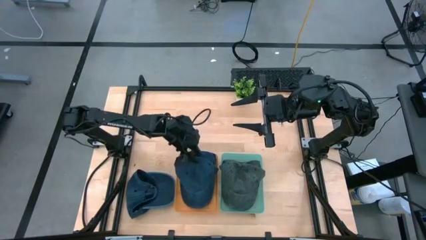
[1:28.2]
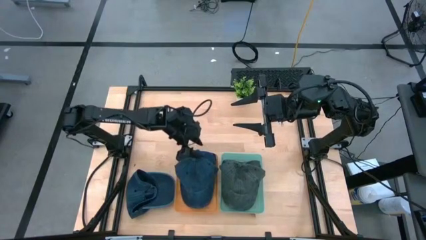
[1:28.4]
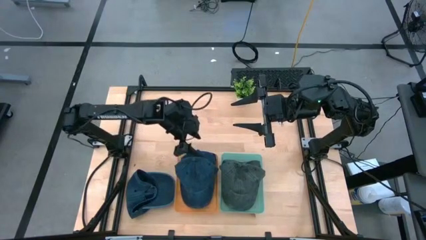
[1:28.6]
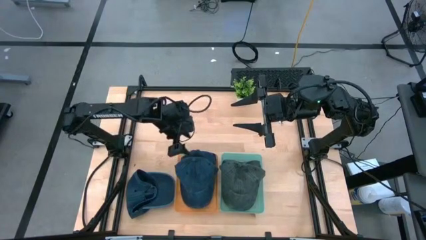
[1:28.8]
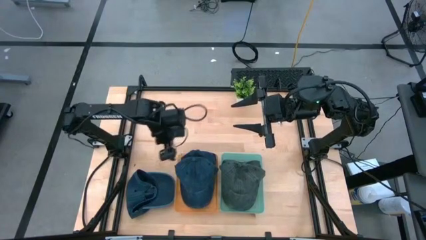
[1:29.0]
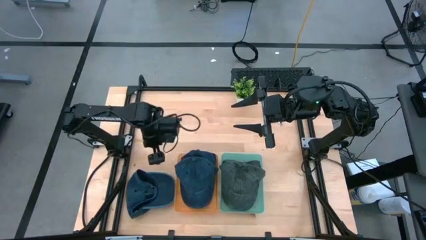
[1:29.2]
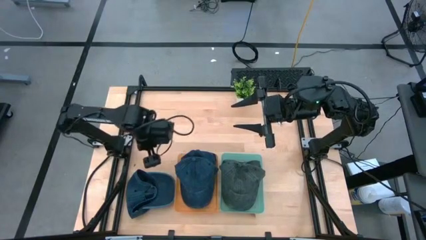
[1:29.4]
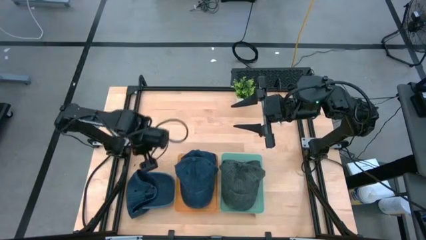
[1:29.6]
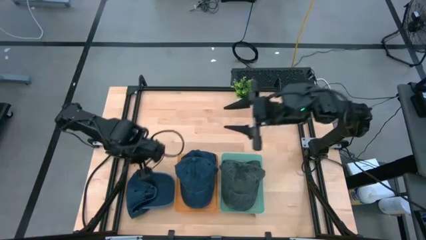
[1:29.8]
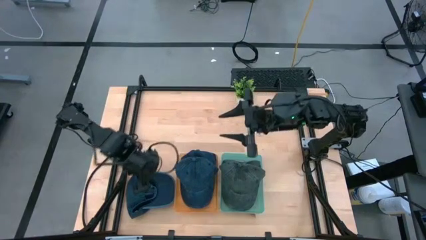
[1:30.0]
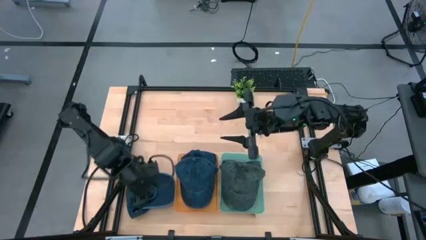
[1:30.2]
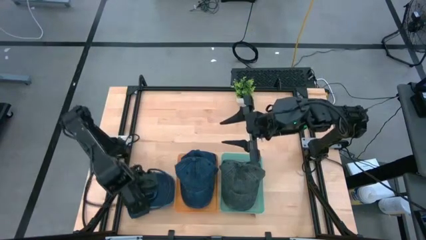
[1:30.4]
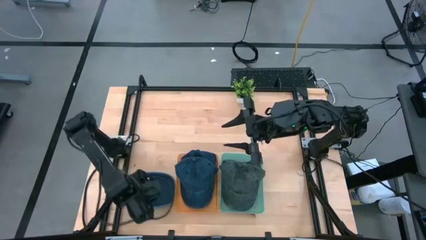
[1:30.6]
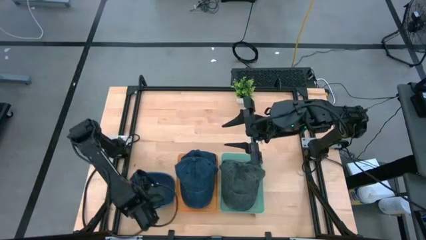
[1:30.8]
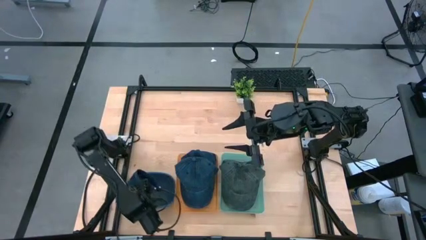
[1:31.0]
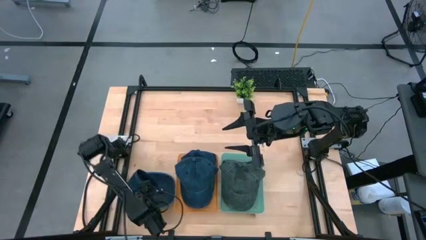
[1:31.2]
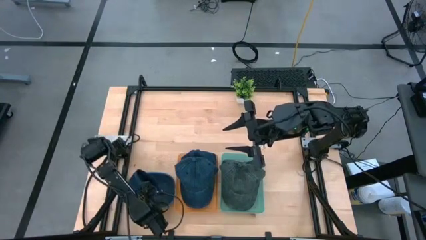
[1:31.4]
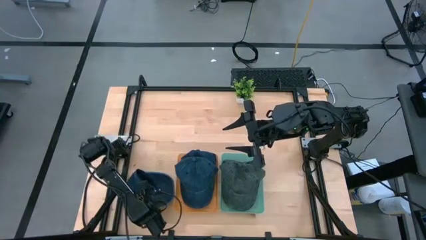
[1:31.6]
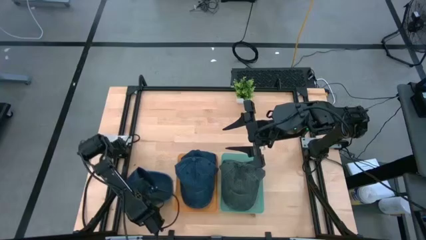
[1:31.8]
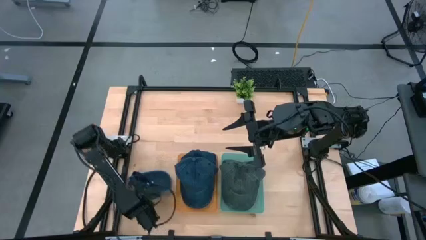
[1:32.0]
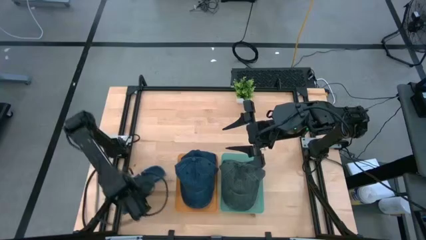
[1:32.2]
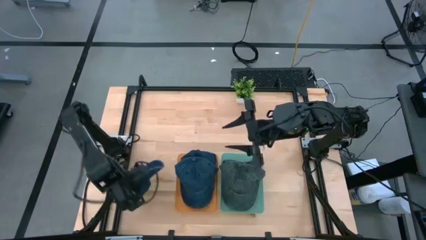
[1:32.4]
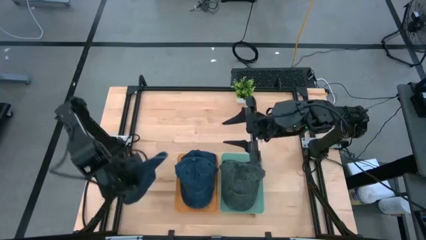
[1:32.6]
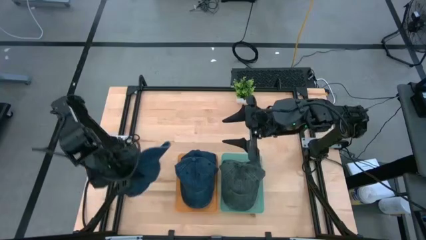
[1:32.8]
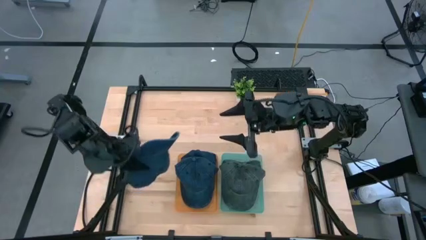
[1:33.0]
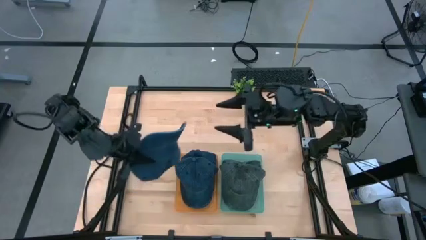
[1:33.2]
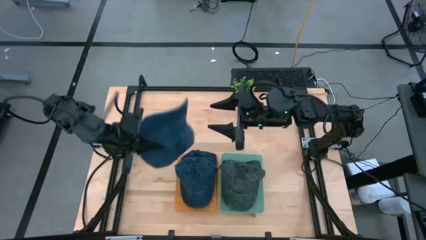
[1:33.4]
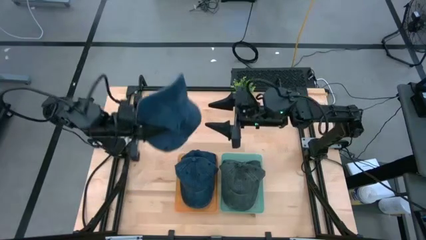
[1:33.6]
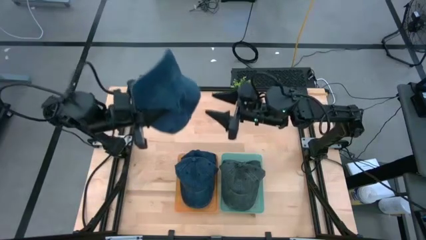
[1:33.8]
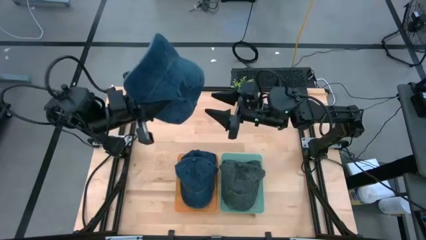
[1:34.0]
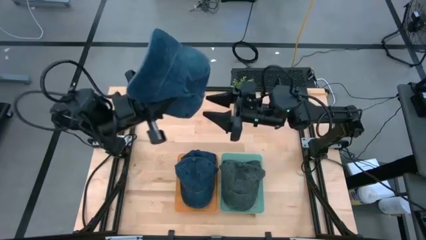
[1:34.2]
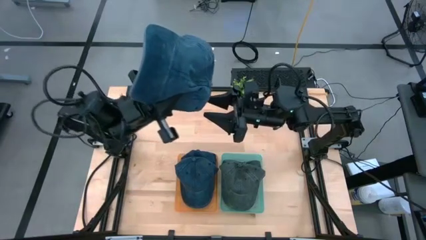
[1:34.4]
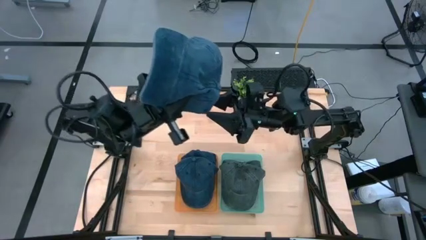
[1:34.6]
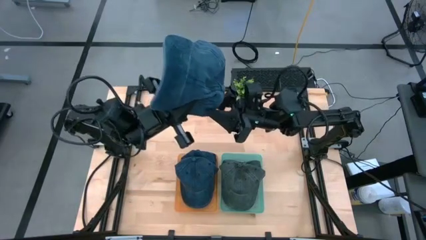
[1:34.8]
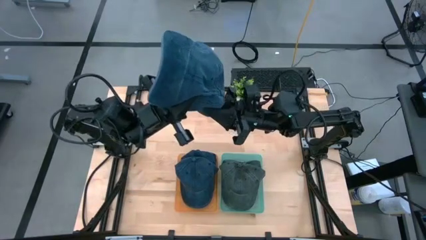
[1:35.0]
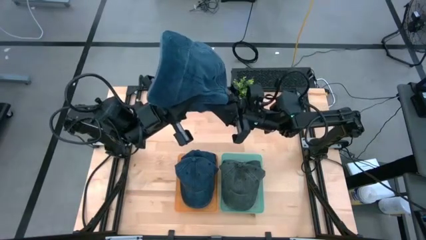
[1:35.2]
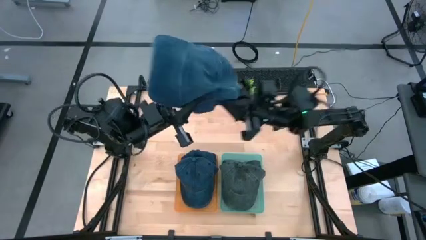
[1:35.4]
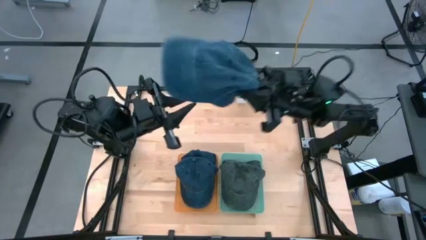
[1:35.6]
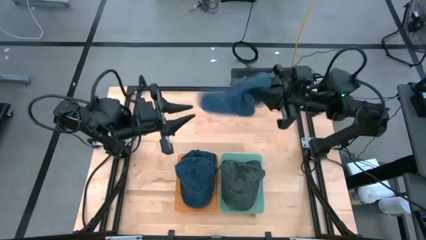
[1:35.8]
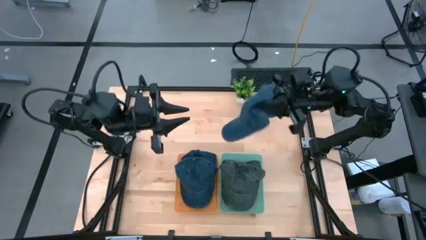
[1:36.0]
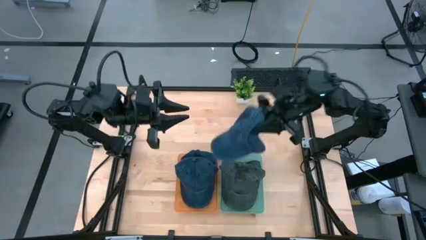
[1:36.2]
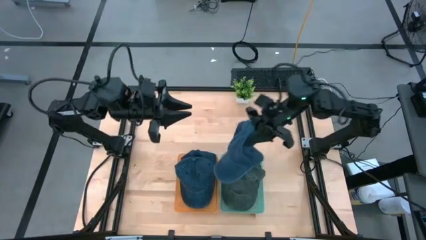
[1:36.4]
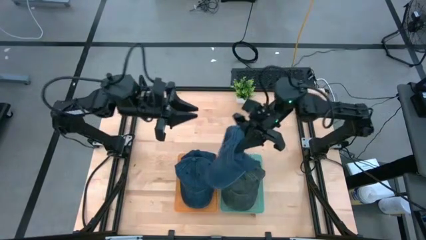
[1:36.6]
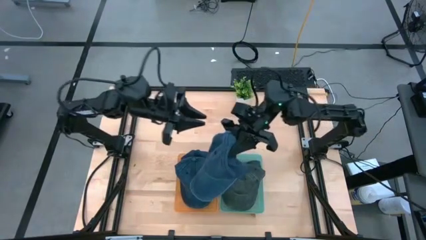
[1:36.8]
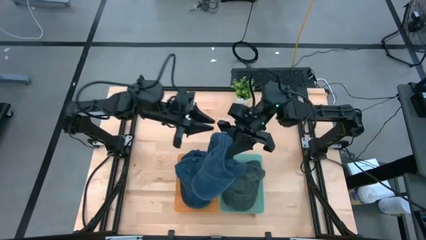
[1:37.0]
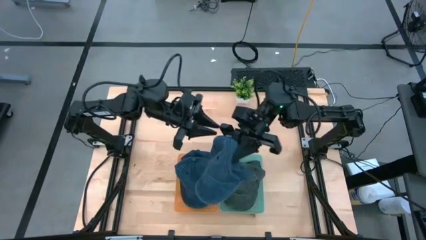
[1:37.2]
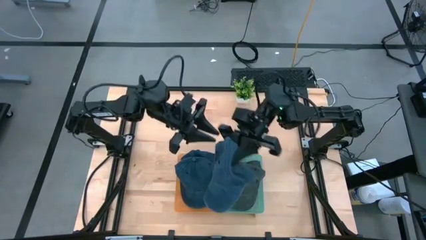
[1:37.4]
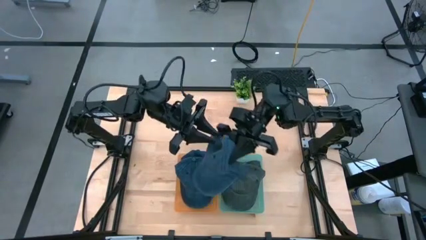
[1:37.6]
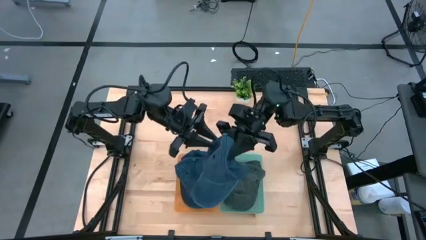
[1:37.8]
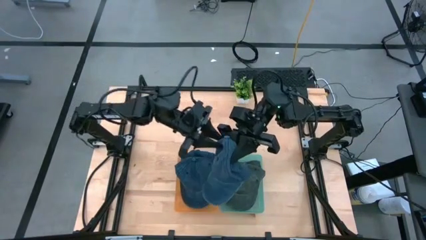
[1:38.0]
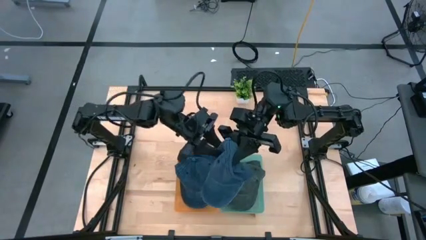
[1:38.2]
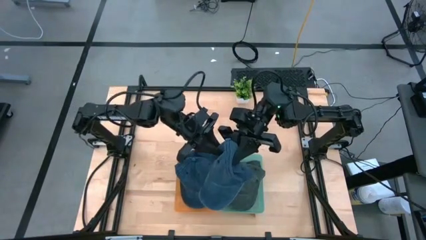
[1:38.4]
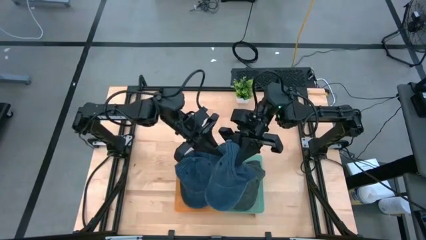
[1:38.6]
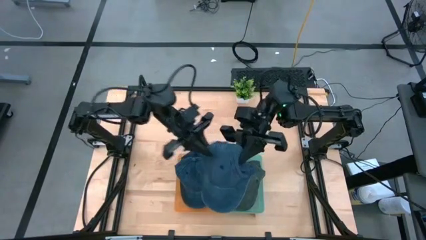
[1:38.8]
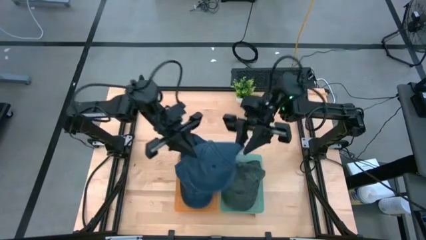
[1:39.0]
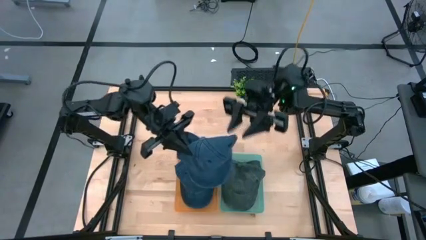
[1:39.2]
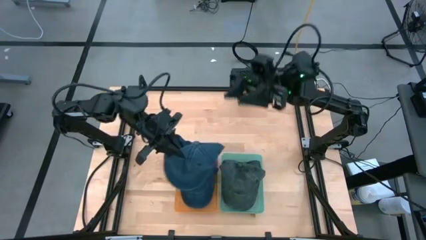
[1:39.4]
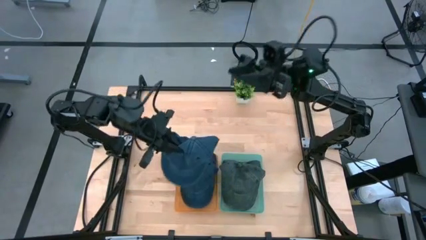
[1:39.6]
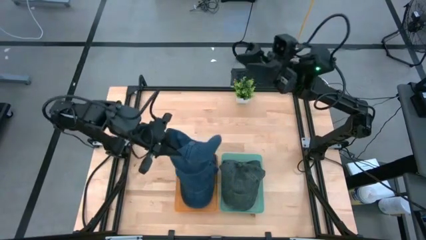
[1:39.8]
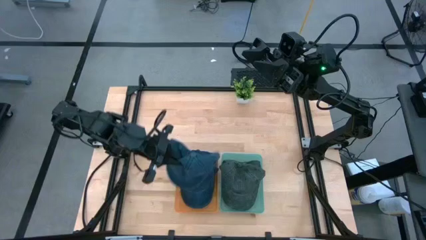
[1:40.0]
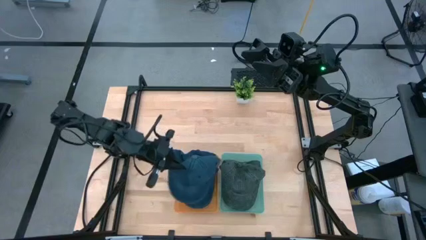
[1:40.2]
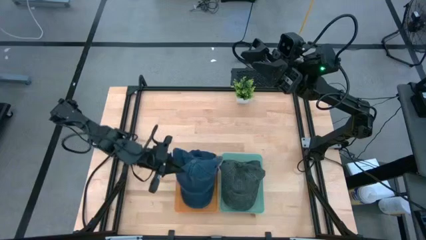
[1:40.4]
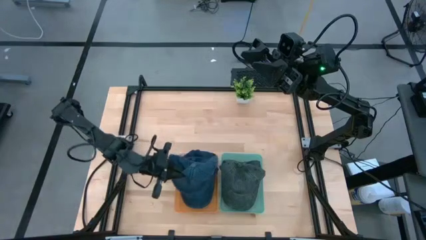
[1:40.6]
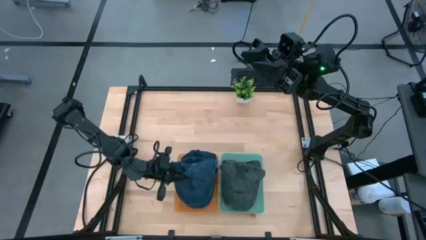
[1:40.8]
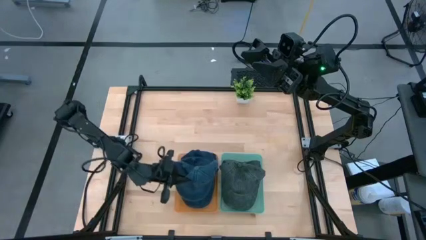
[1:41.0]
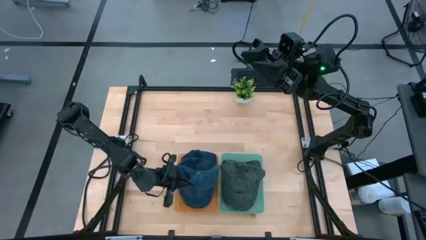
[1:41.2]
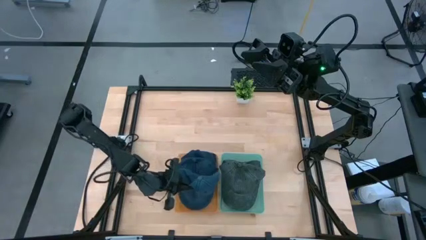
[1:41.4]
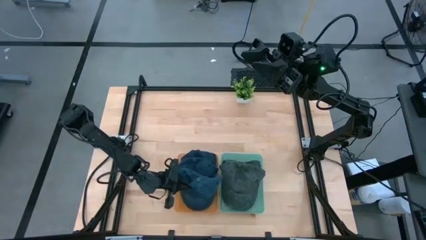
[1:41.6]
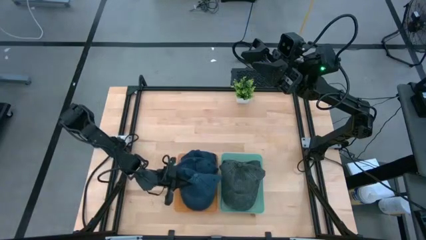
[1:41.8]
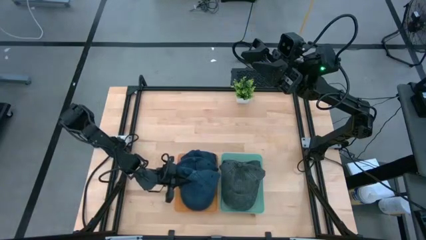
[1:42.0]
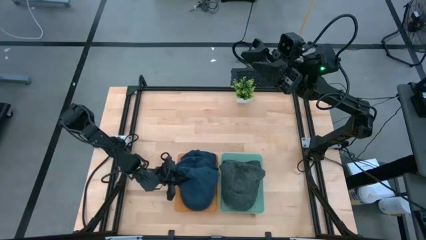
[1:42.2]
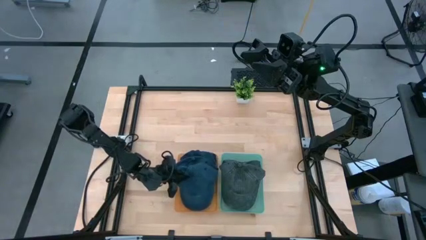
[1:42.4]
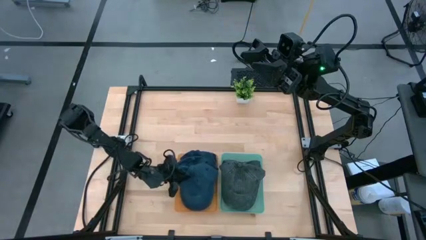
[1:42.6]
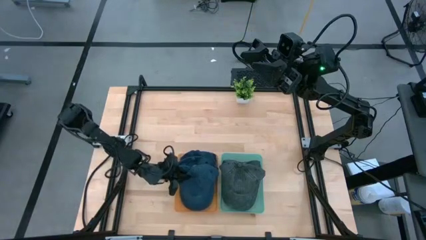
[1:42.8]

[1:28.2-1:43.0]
Task: Pick & Place hat
Put the blue cap into the orange bin

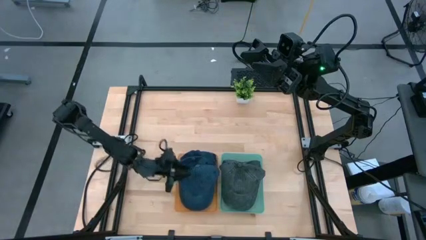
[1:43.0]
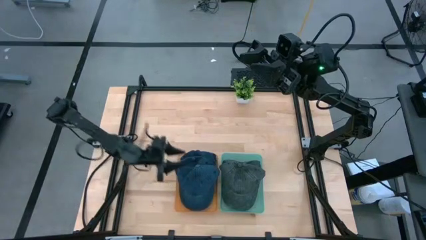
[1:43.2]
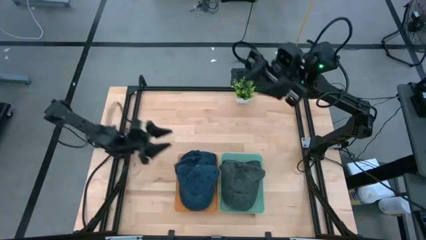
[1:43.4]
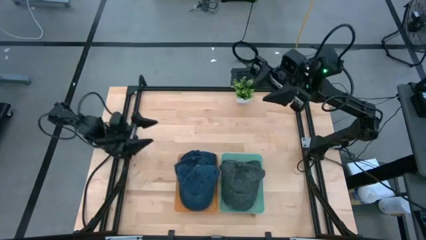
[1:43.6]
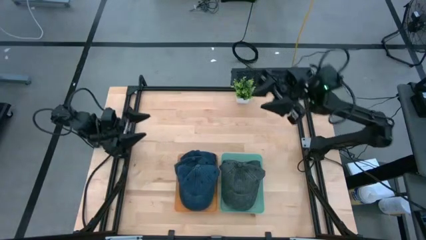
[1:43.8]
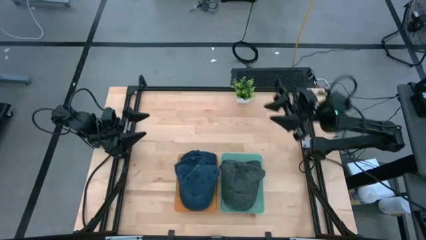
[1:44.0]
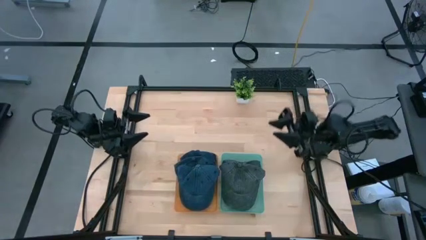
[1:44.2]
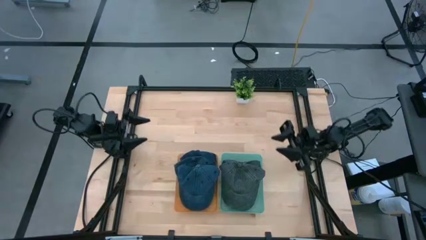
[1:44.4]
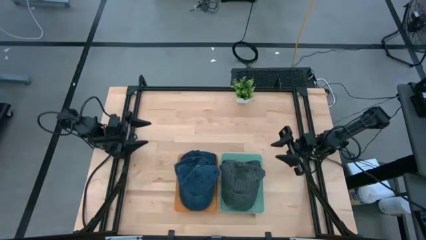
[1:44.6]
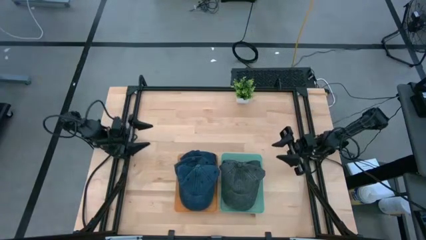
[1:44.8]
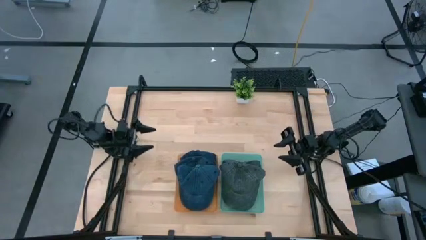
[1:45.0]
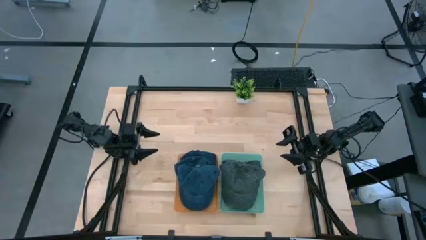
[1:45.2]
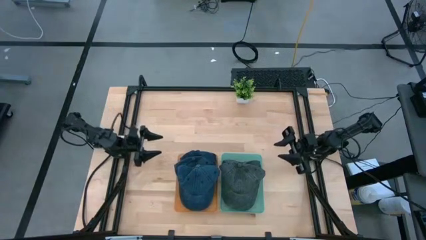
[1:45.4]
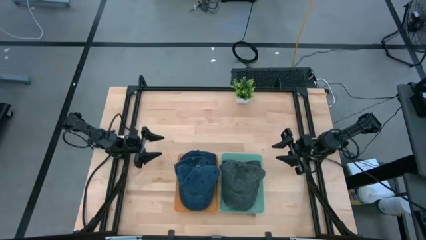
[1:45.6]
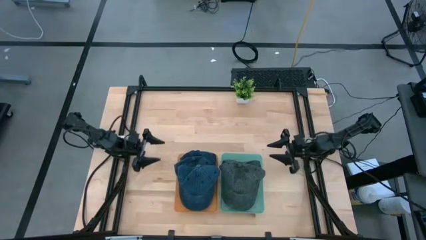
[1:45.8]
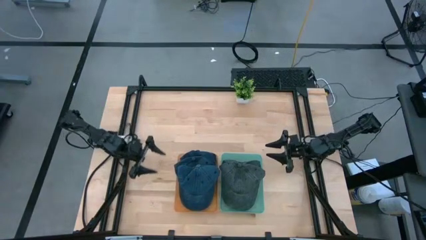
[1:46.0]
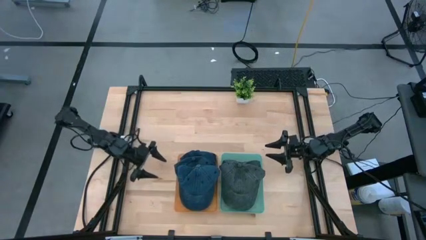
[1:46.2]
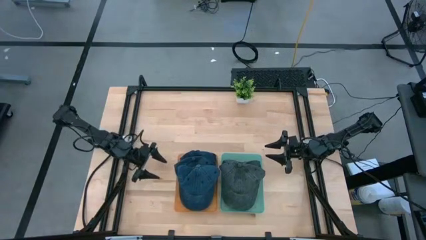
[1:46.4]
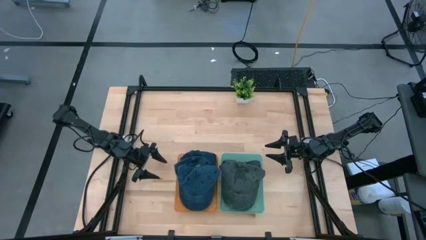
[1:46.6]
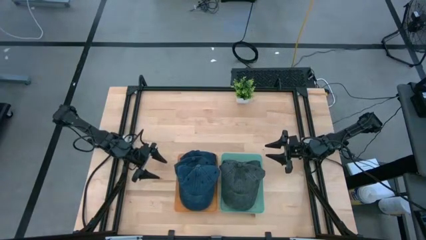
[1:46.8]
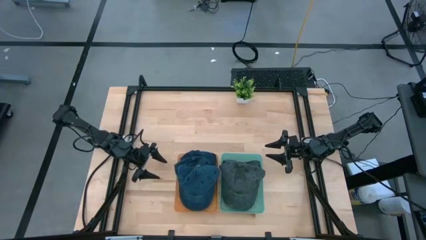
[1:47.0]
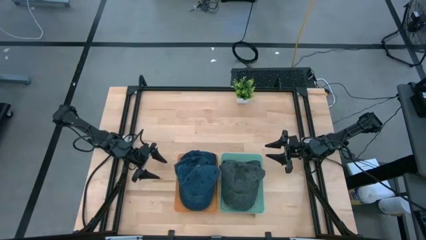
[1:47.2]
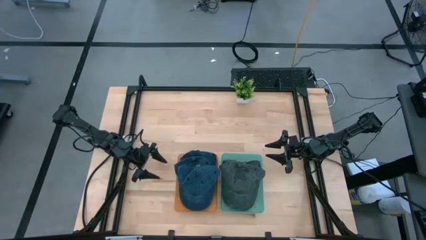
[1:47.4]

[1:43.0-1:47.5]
Return to Home Position
